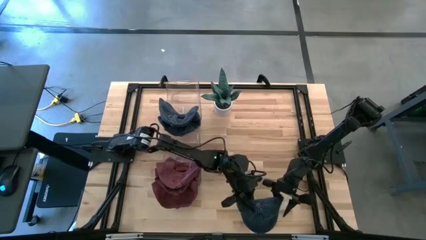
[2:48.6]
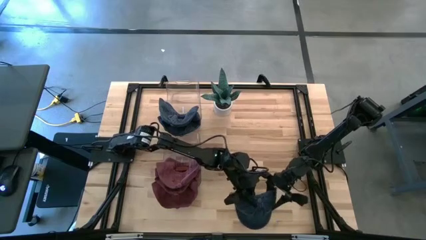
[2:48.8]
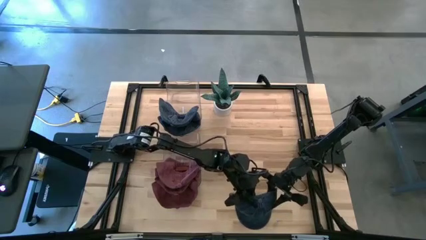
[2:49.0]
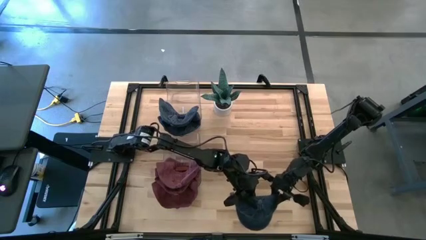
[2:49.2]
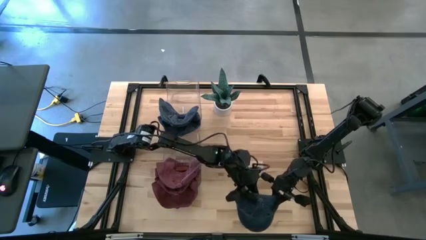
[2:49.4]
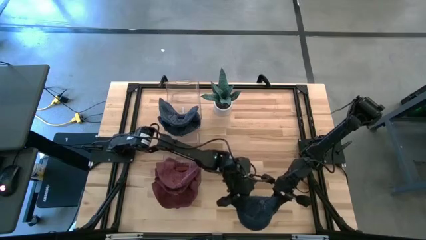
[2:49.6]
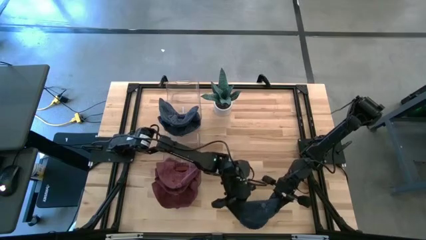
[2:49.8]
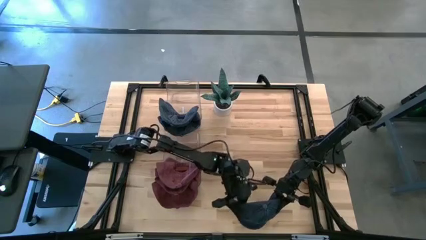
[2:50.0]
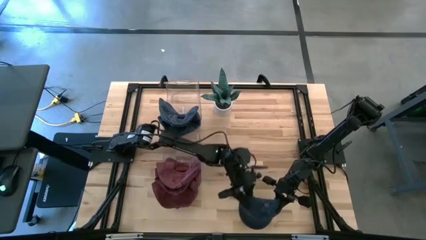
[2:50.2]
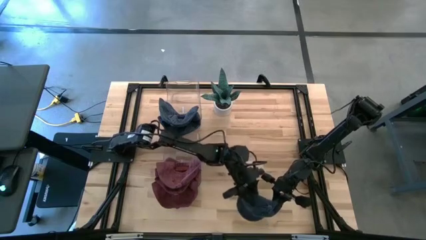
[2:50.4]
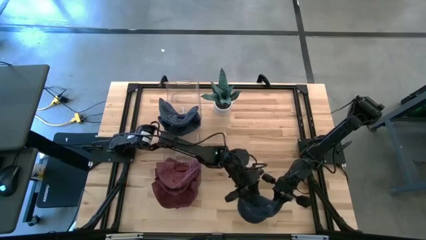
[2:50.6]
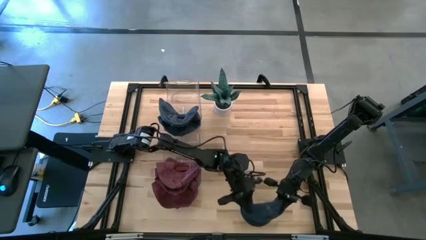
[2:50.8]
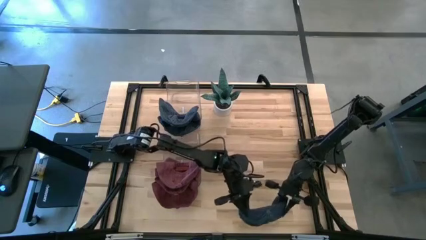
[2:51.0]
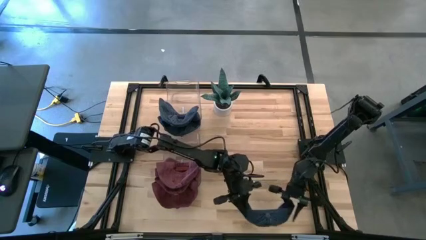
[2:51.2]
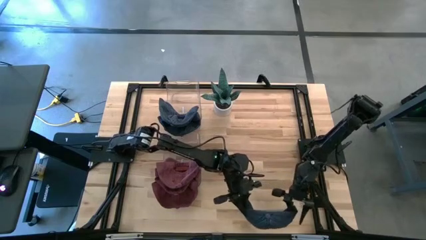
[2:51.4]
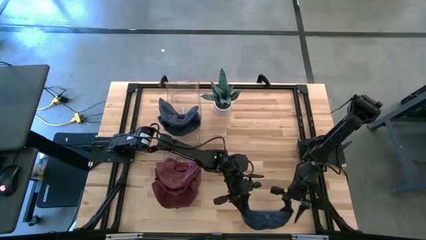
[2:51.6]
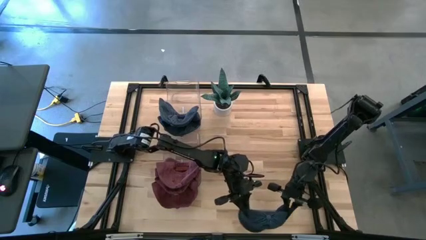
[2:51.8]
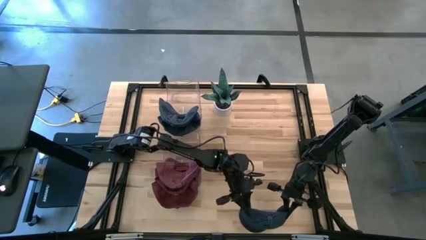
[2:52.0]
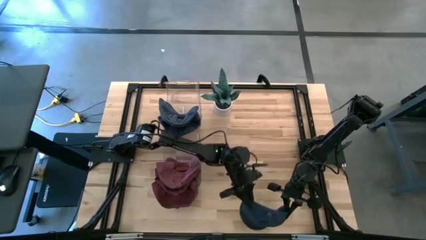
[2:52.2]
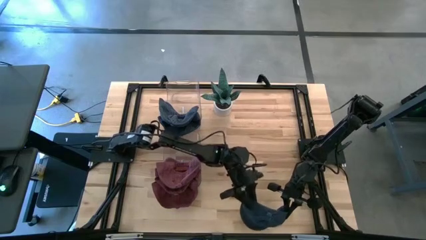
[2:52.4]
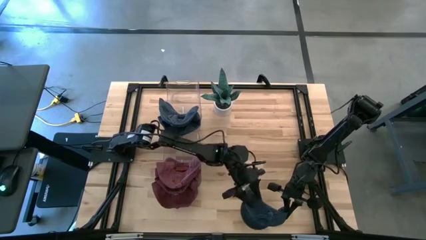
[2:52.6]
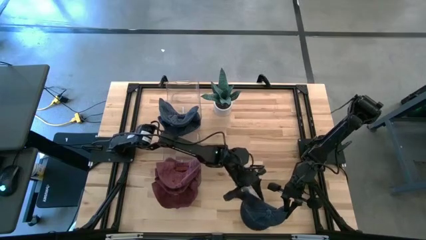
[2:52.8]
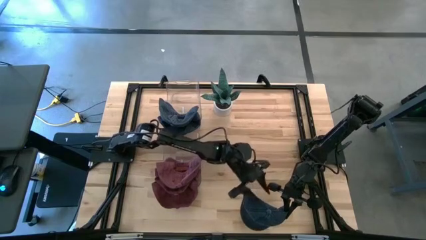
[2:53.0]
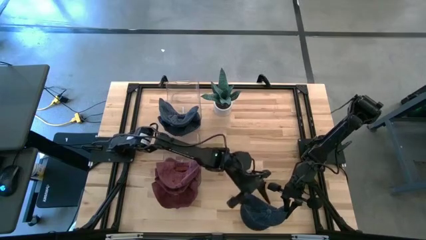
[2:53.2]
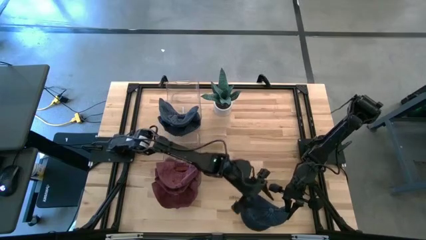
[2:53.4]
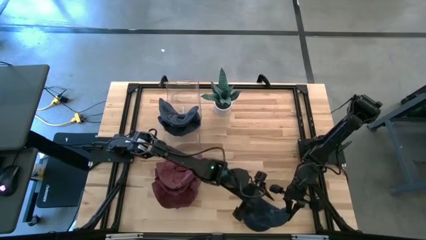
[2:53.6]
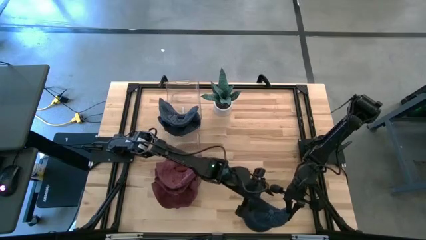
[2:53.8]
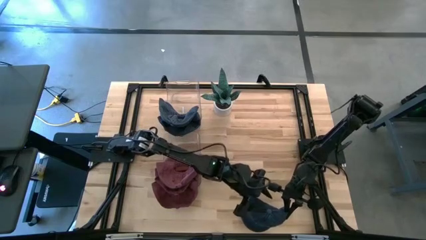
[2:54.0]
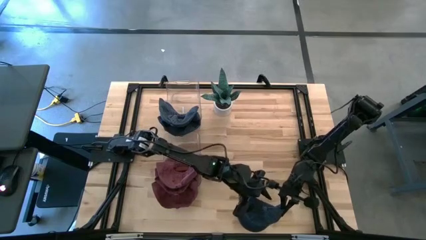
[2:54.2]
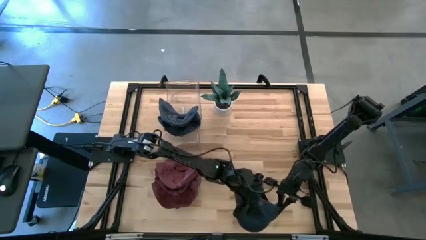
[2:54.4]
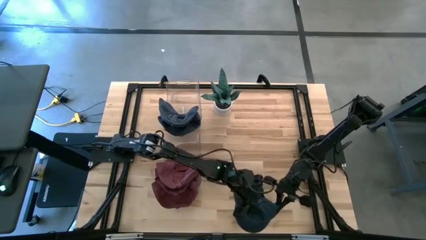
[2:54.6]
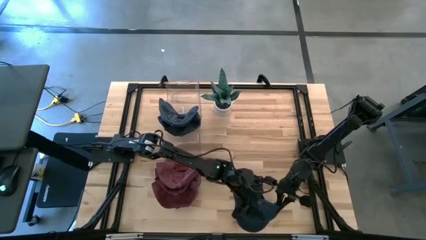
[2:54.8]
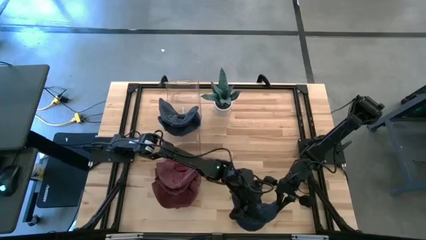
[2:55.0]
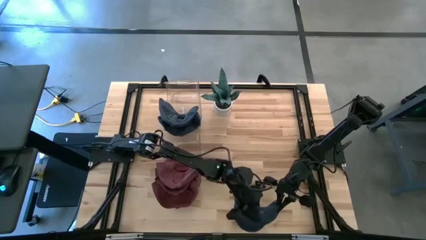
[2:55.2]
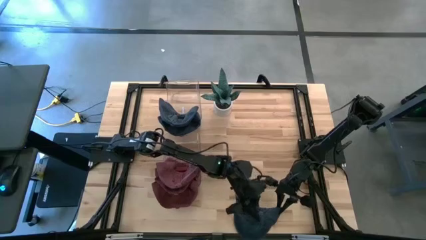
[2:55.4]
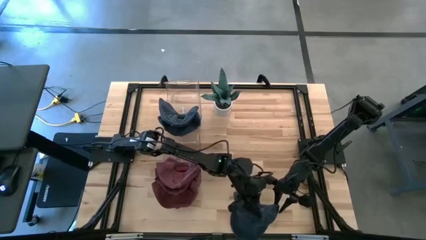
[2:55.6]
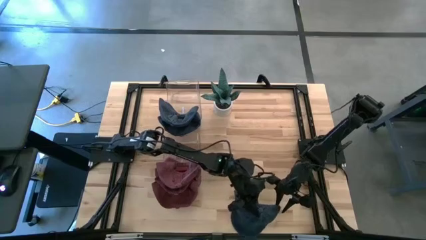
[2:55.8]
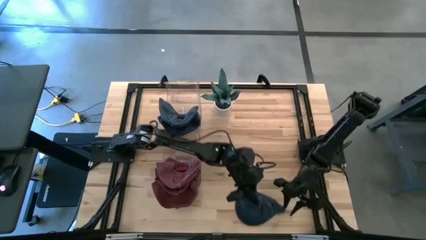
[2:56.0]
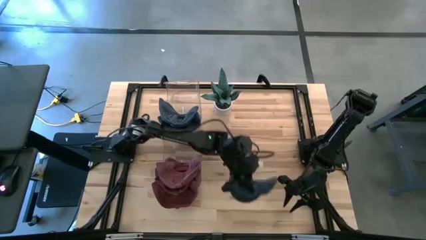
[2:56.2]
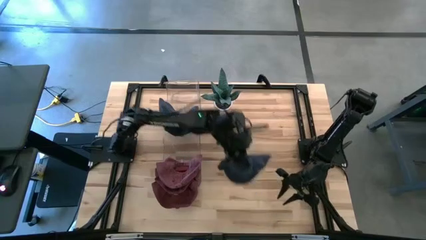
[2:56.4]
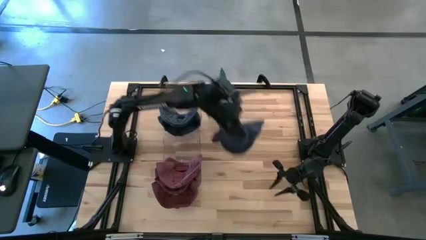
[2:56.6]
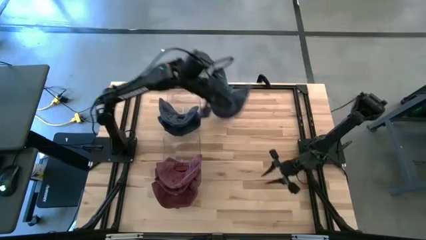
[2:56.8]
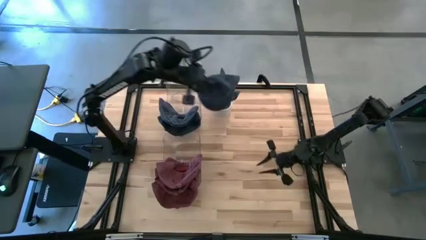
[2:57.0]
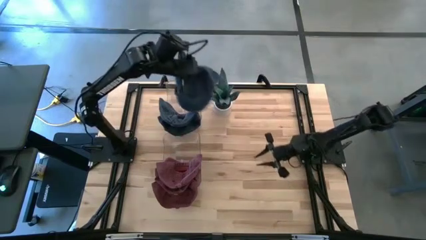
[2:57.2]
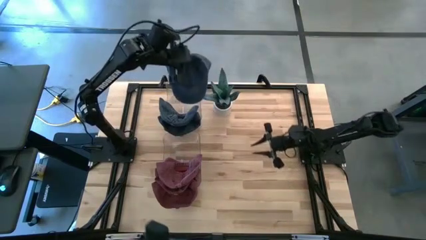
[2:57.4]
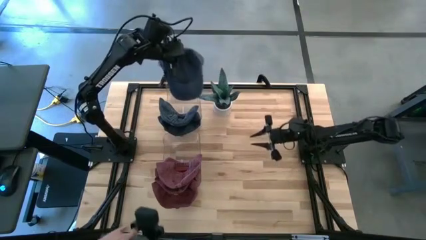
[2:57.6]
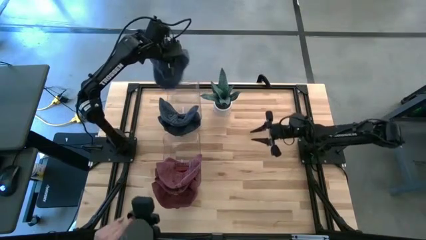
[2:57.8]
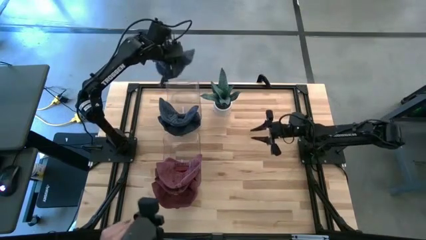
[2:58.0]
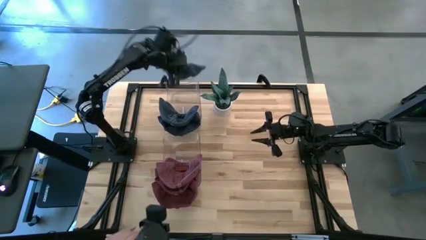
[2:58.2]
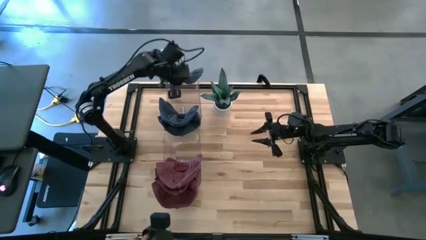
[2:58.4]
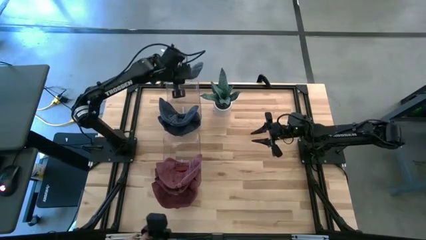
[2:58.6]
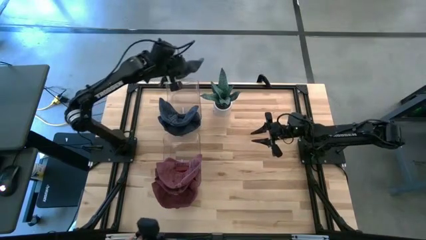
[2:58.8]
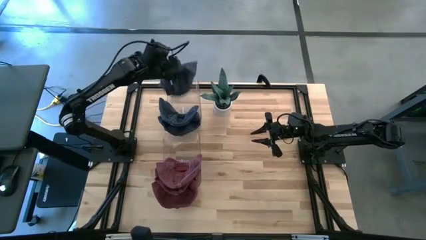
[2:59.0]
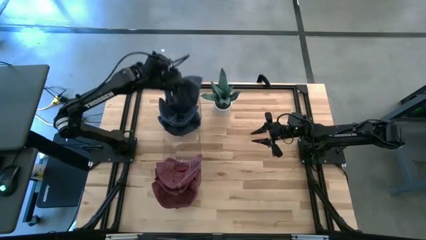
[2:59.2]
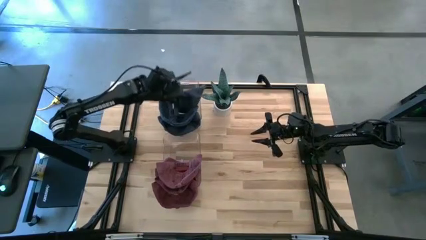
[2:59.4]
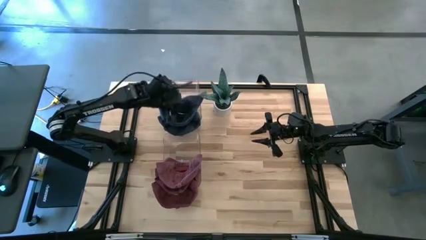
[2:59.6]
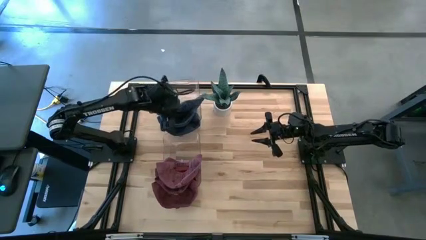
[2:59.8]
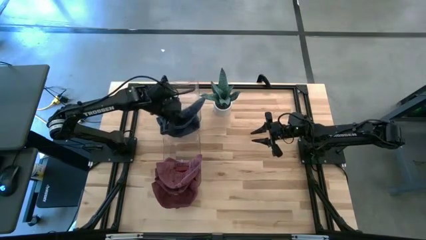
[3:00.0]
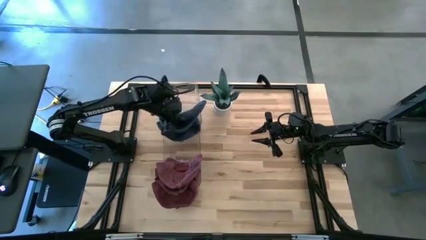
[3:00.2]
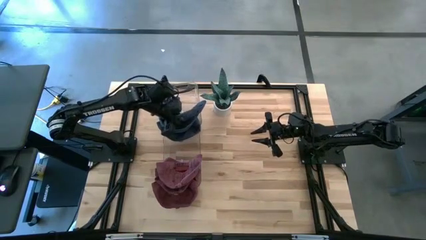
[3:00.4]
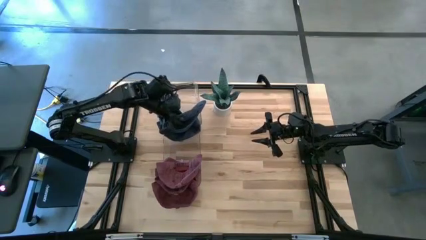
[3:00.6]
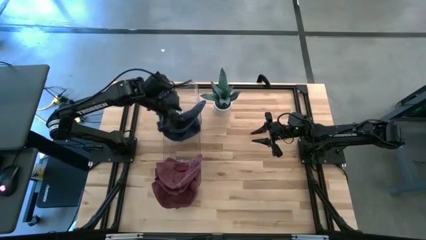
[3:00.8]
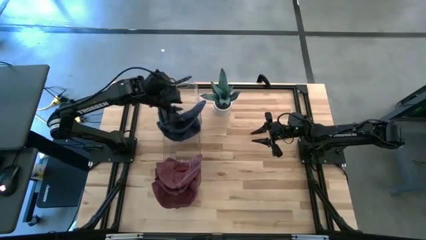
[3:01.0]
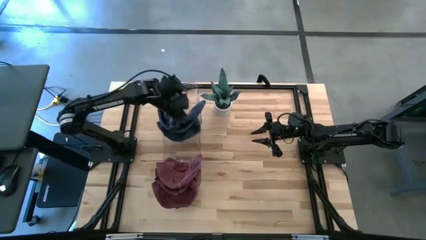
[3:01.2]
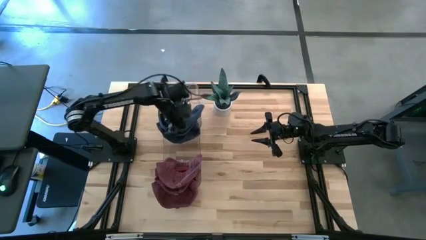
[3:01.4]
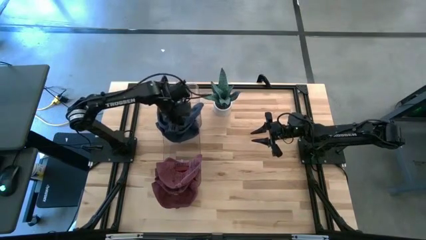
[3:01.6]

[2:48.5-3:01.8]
Task: Pick & Place hat
Put the blue cap into the top transparent bin

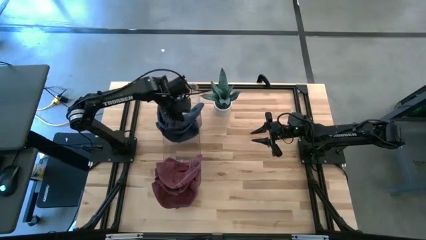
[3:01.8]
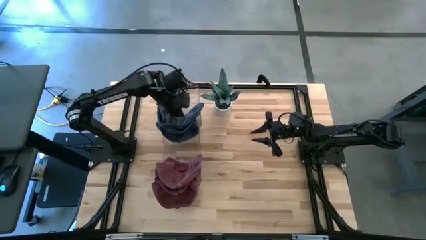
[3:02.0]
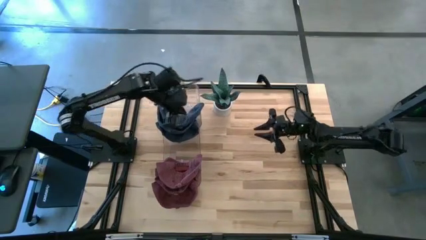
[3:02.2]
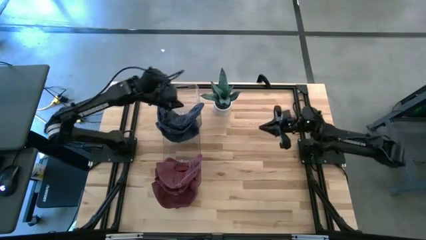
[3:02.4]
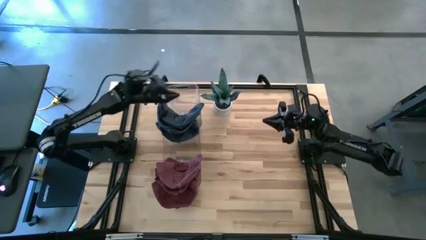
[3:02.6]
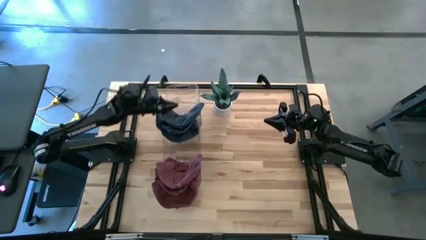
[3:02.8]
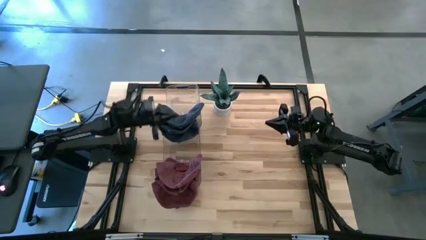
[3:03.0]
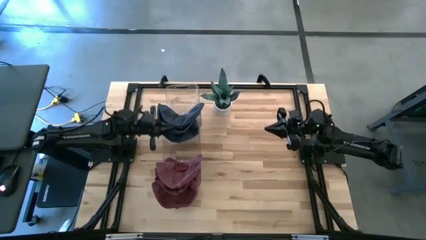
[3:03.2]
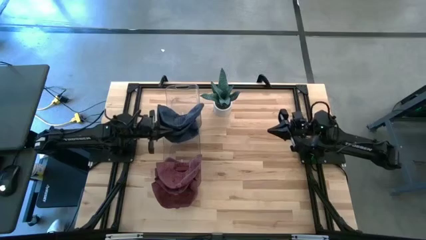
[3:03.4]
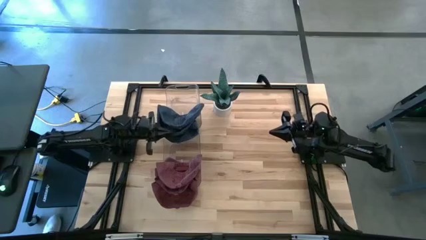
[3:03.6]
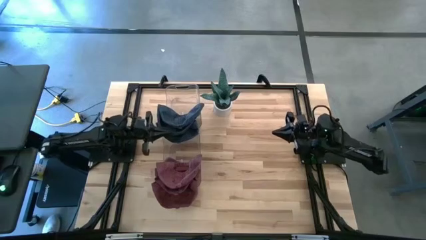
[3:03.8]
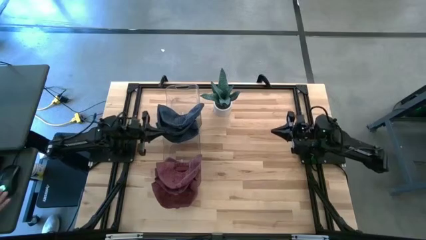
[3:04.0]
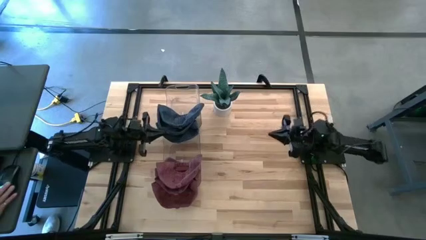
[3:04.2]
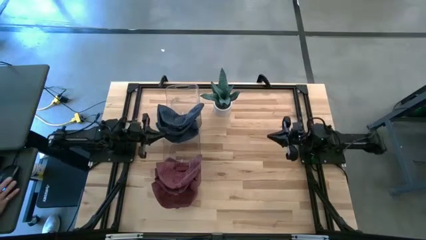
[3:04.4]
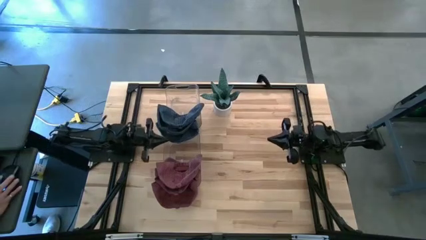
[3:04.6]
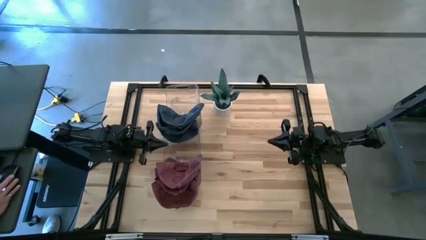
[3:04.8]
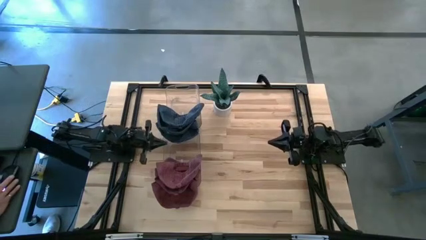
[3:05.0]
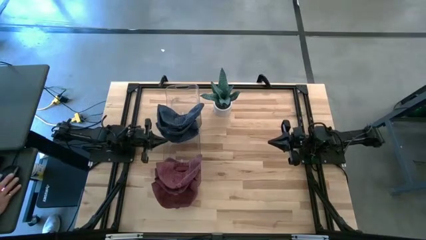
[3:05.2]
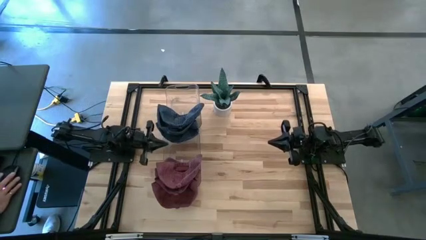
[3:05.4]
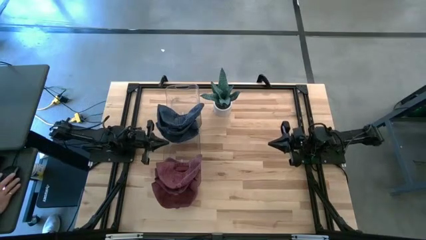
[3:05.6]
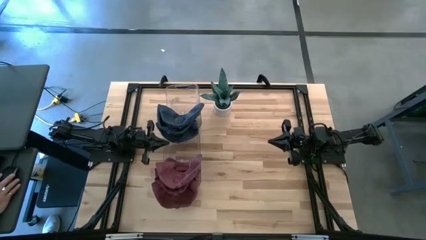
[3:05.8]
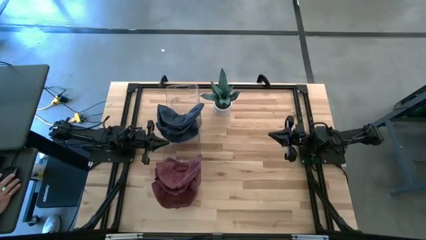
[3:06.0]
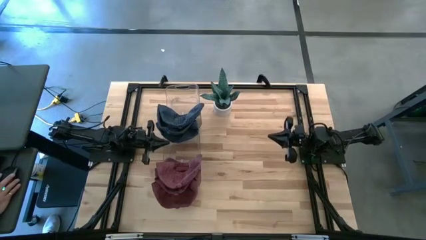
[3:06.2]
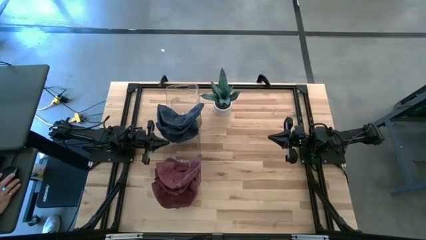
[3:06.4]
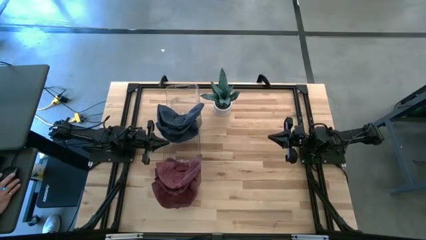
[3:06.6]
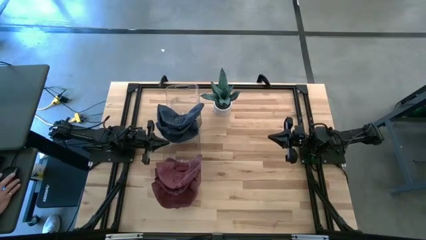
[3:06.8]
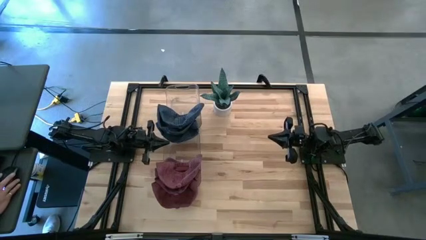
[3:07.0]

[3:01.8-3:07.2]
Return to Home Position
